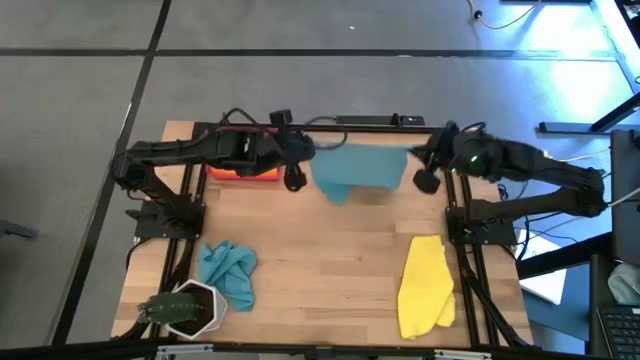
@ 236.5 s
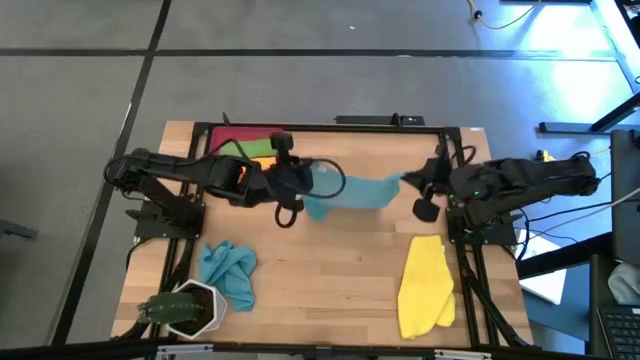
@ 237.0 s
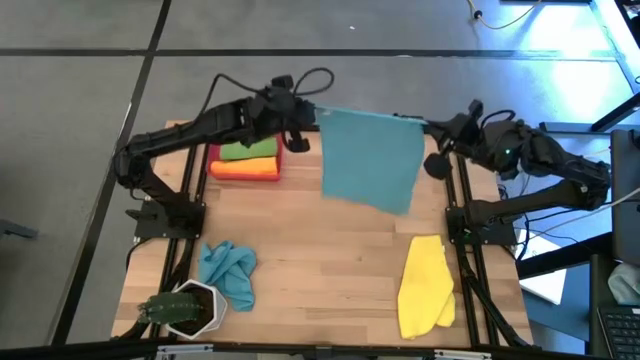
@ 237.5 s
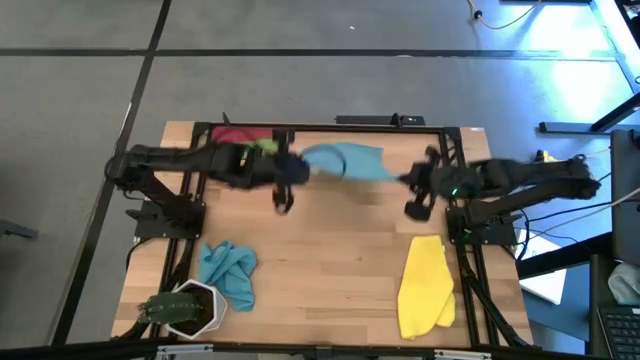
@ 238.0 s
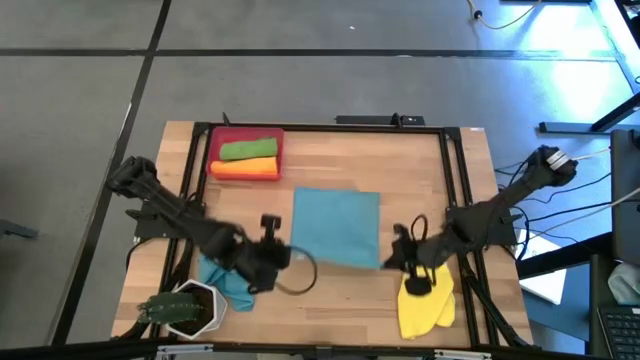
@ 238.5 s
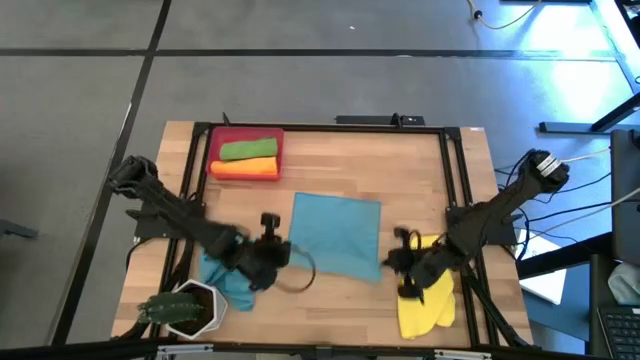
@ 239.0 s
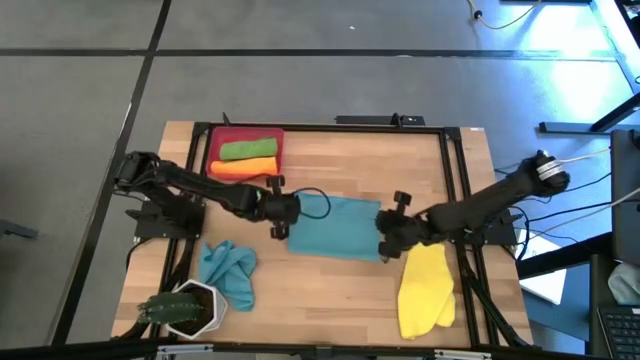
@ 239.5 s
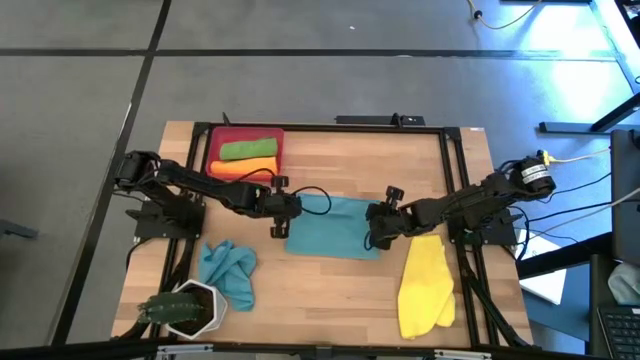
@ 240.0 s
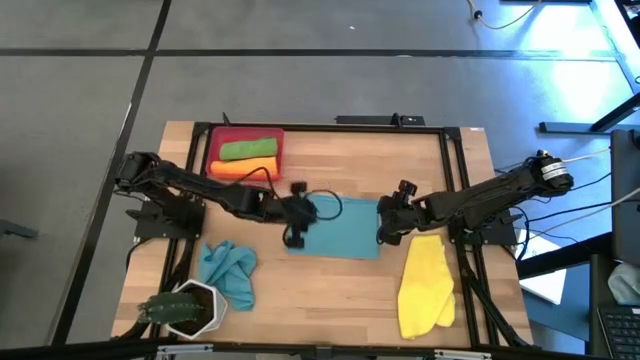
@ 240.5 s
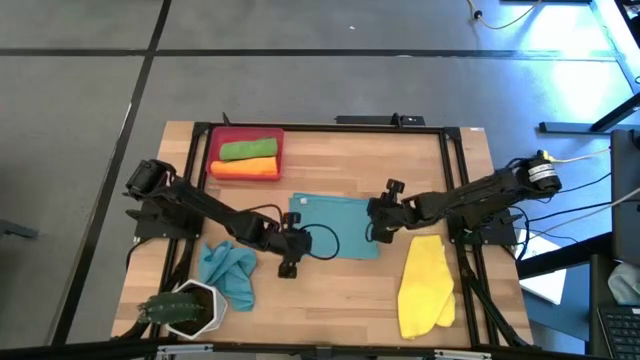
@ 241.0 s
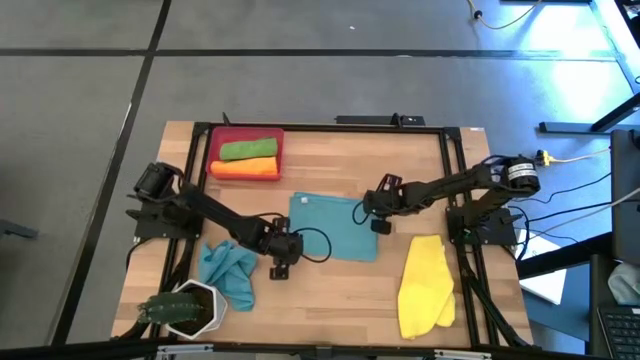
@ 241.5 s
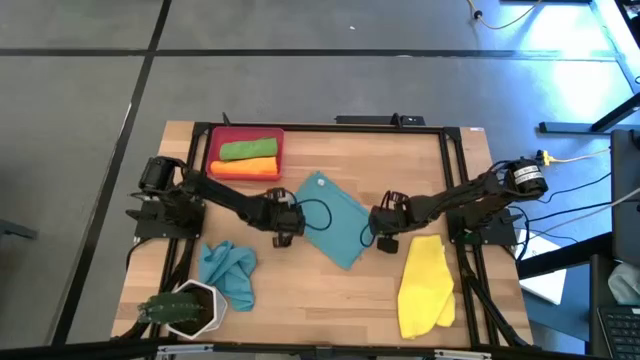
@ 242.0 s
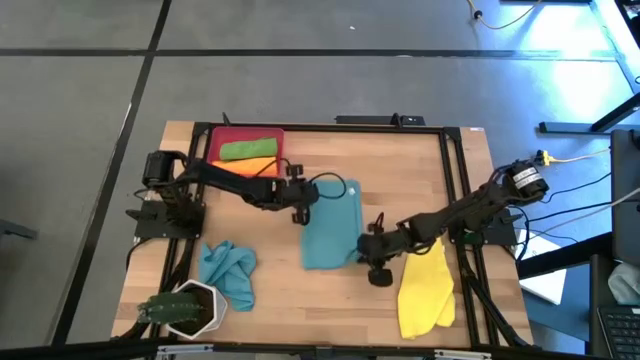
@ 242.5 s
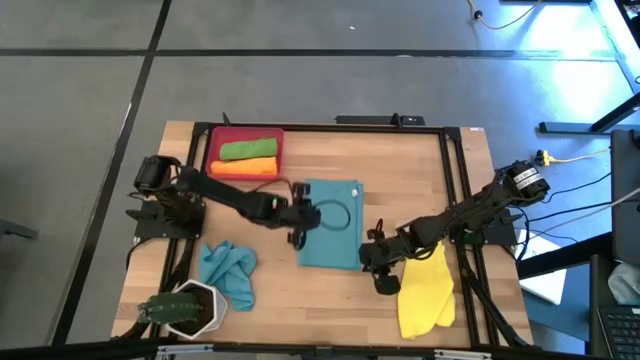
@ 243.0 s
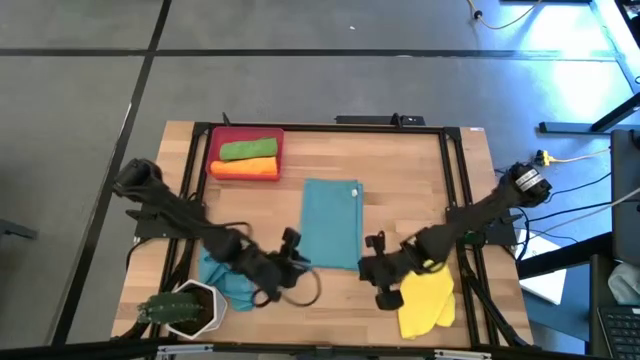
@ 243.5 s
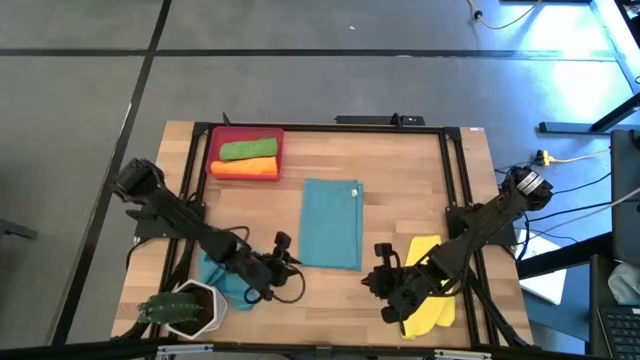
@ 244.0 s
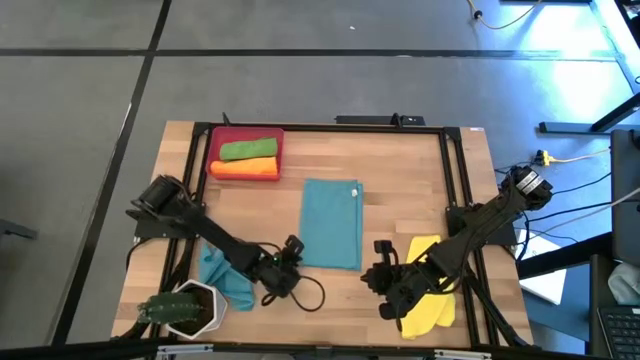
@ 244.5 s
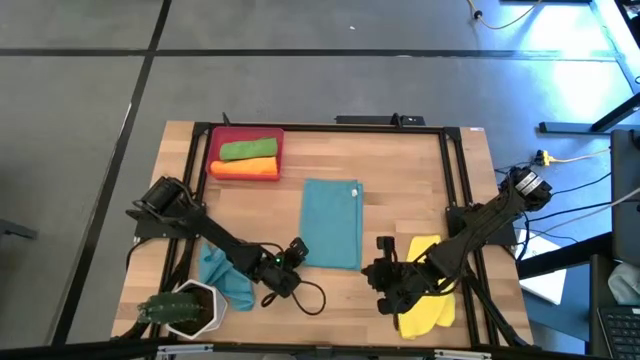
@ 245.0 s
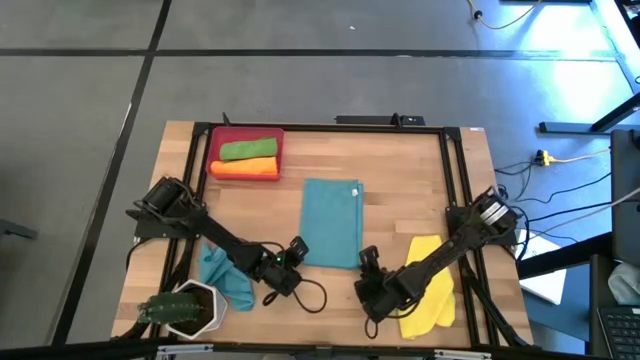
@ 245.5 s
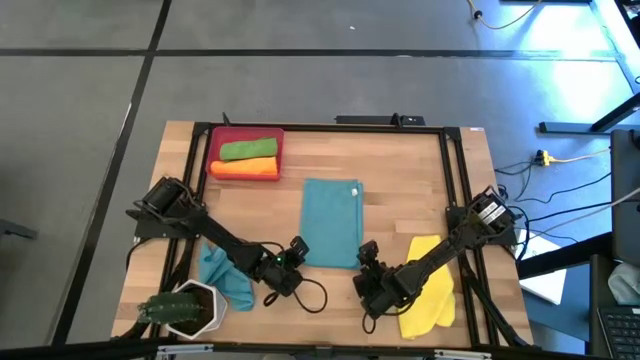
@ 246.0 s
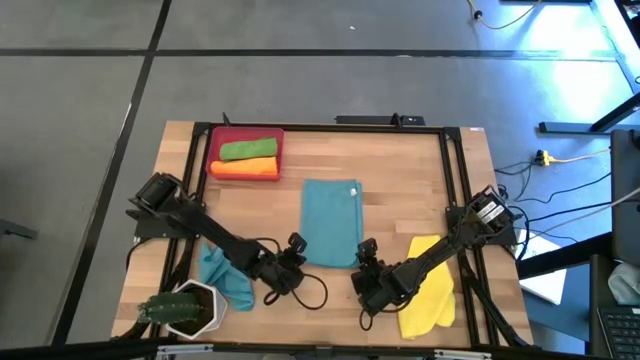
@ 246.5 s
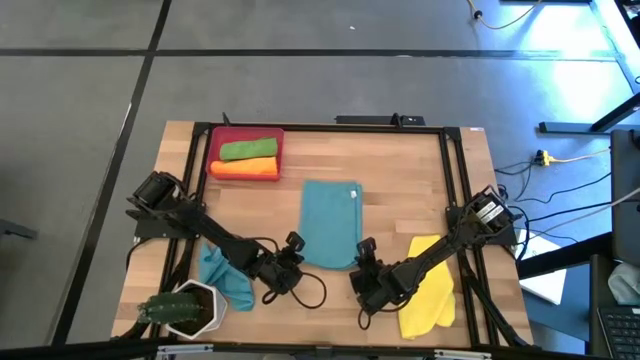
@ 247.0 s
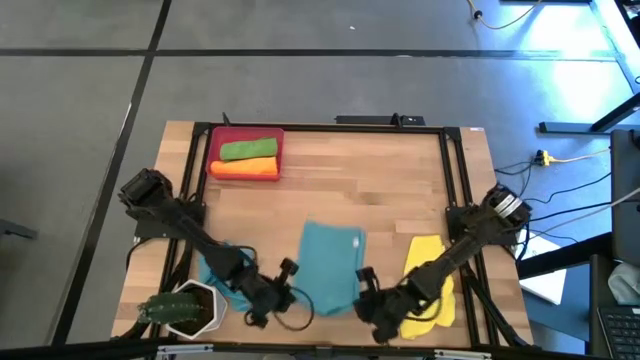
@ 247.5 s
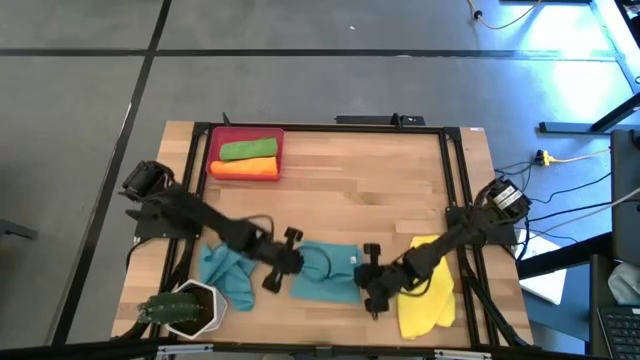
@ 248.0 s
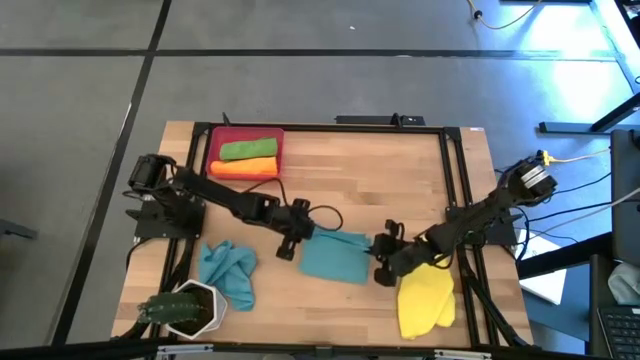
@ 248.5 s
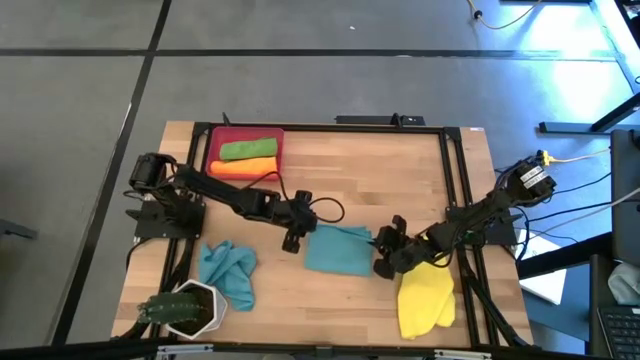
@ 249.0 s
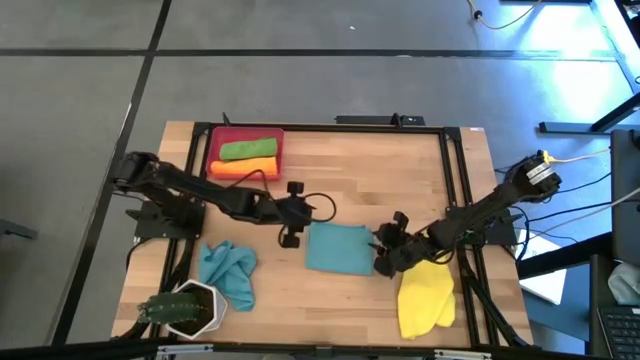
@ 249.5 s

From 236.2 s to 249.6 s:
Task: Roll microfiber towels into tight, uniform cylinder then place into a basket
Fold the right blue microfiber towel

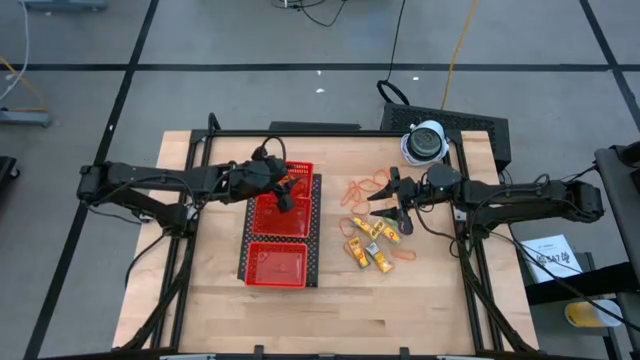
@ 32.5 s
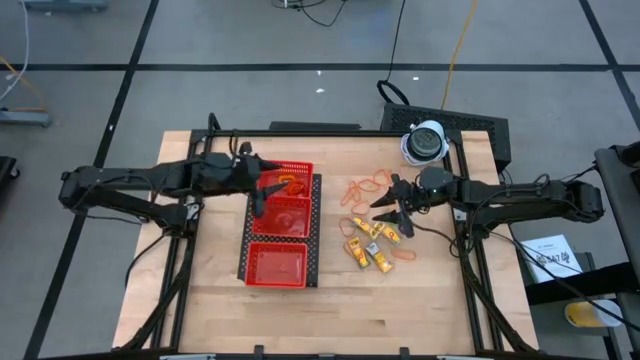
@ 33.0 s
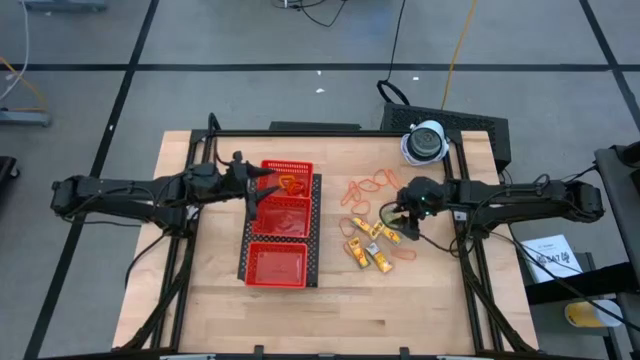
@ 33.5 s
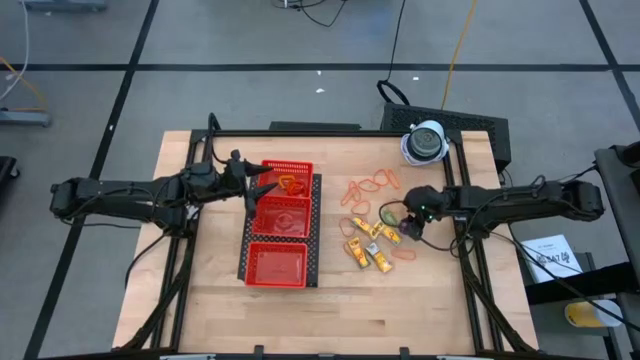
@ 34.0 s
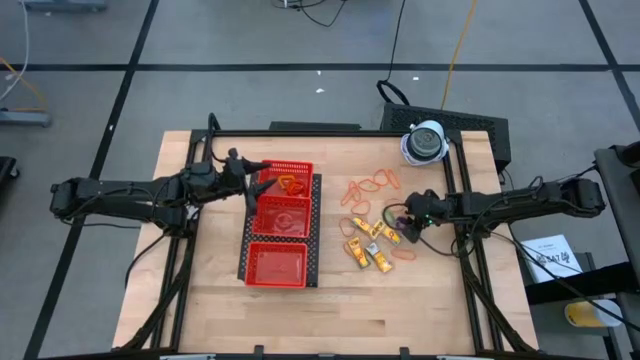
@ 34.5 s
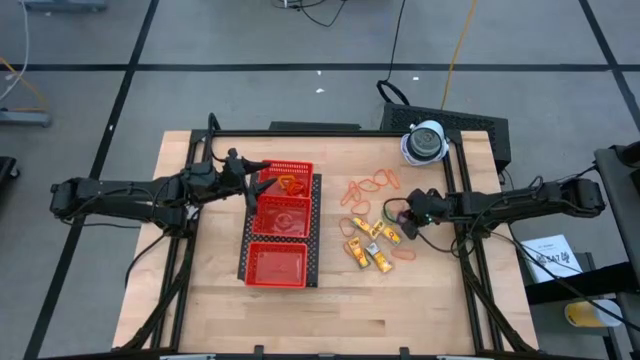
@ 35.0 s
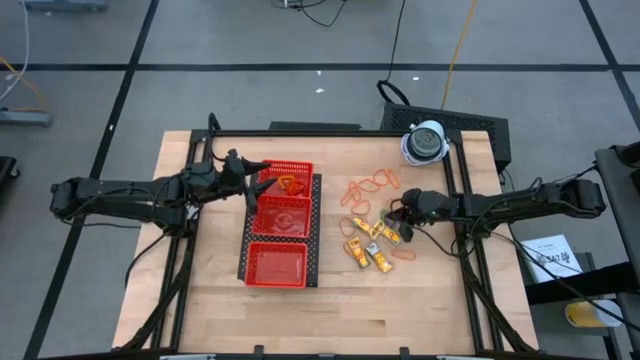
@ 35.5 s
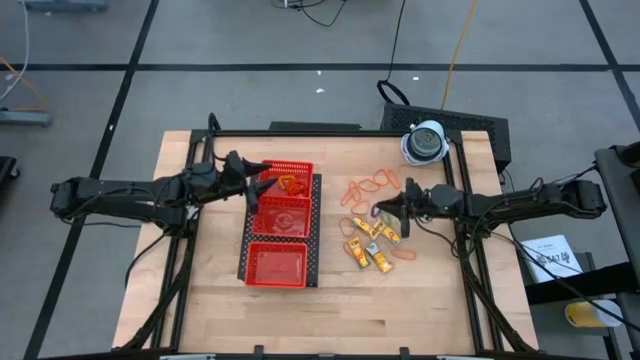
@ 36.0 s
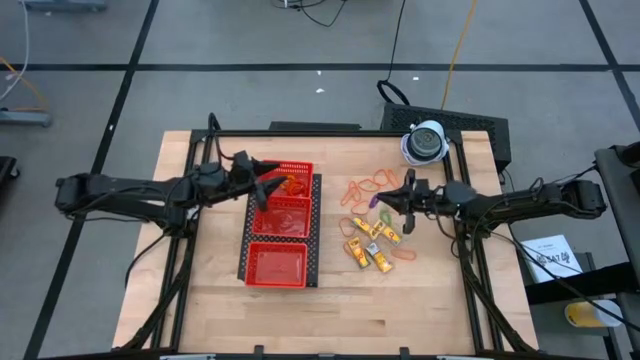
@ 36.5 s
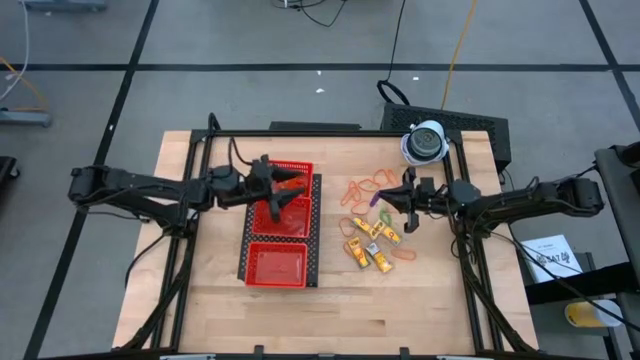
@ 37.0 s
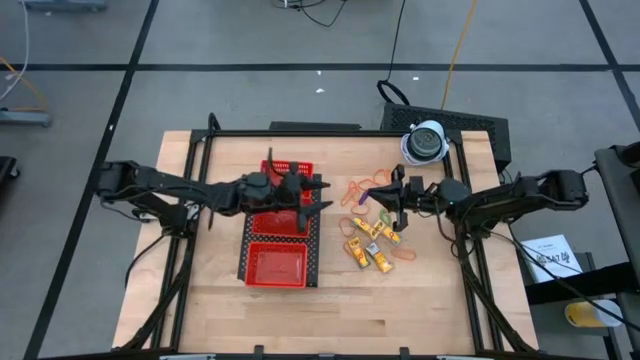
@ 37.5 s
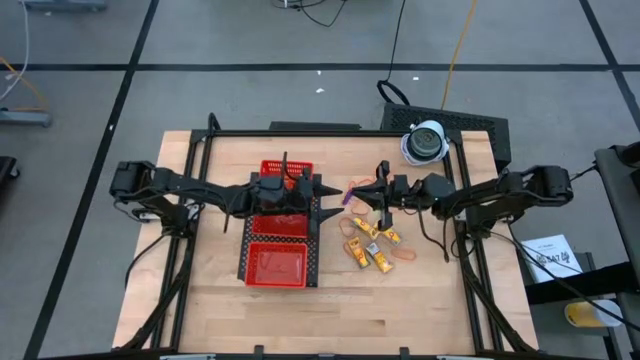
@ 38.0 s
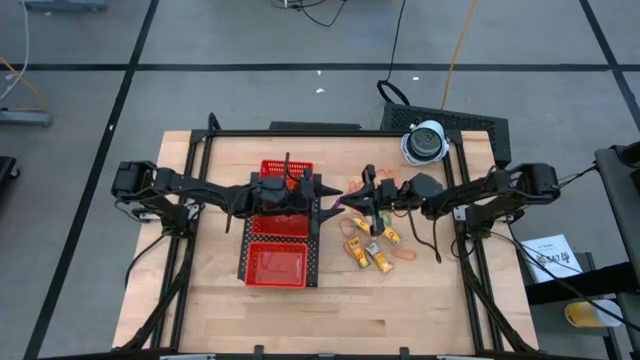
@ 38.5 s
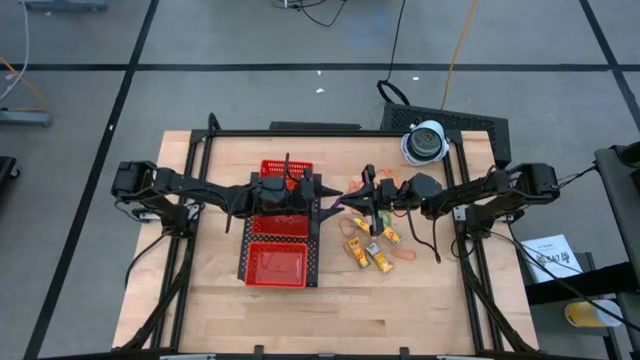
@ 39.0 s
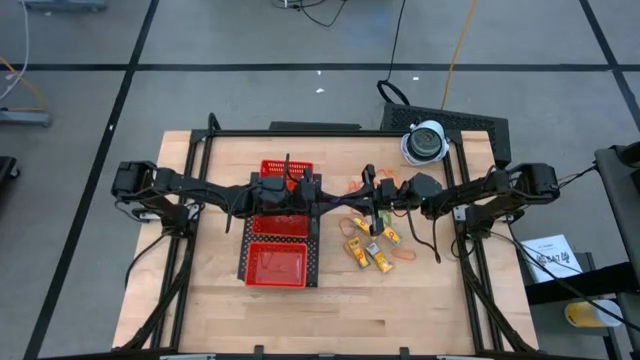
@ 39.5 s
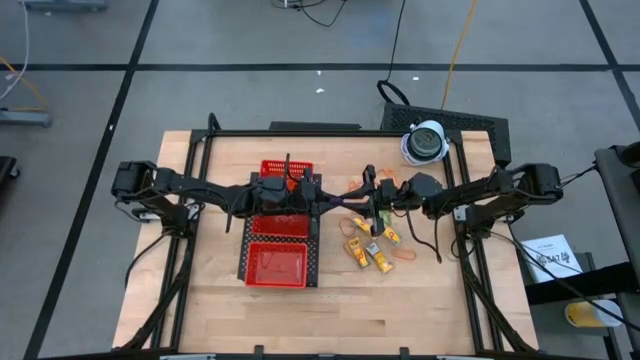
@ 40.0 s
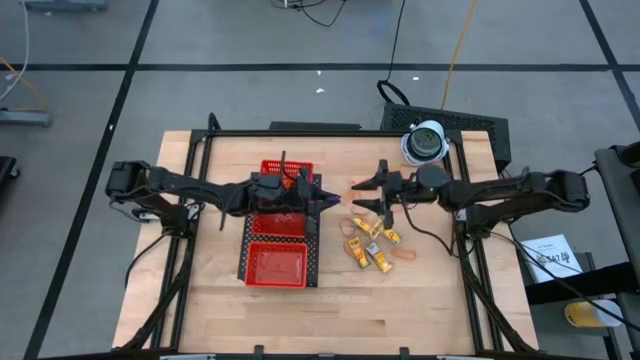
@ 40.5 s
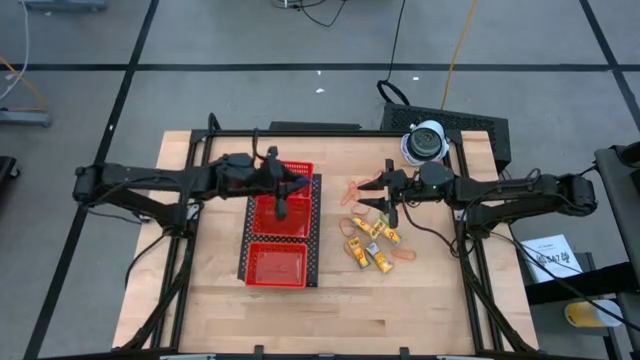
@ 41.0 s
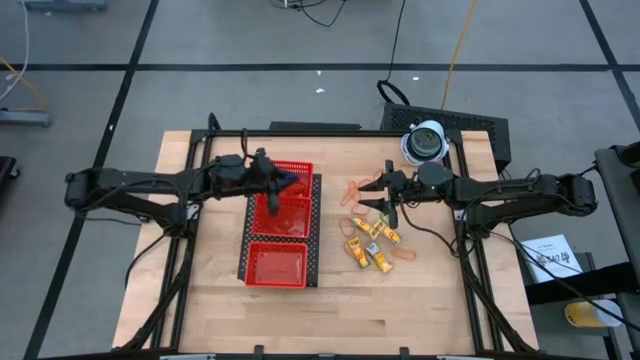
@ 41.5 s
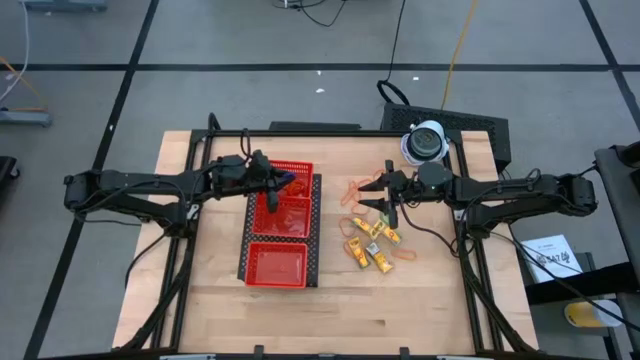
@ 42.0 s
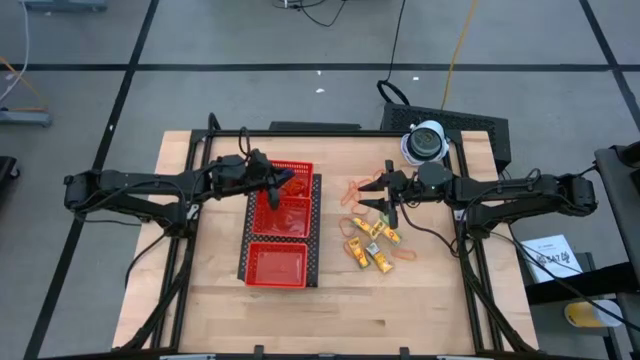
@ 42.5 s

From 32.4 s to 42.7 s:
Task: Pick & Place Office Desk Supplies
Put the purple spring keychain into the top red basket on the shelf
